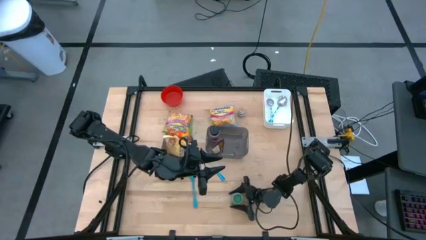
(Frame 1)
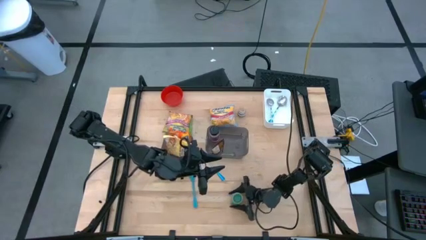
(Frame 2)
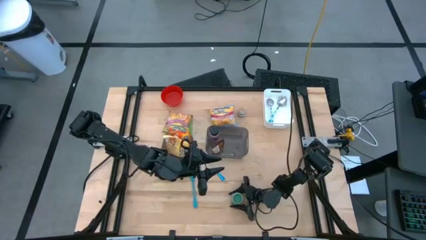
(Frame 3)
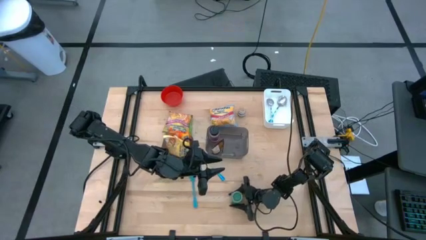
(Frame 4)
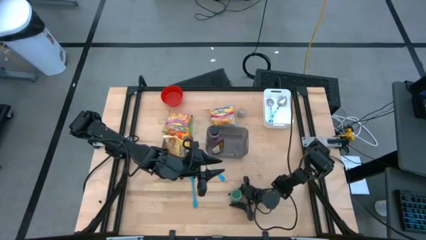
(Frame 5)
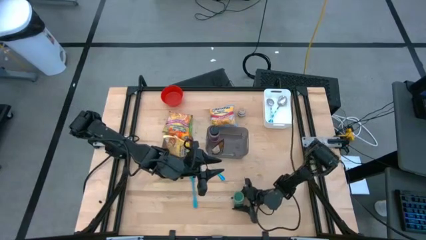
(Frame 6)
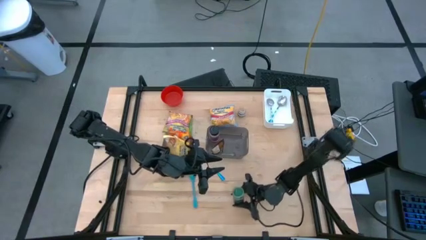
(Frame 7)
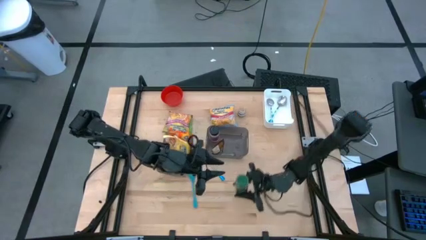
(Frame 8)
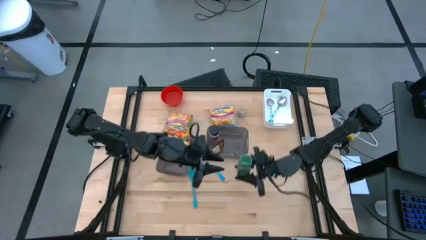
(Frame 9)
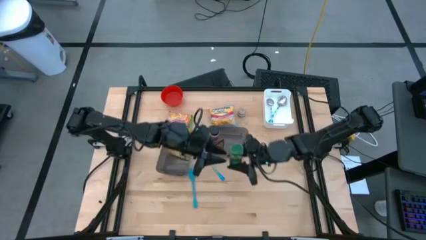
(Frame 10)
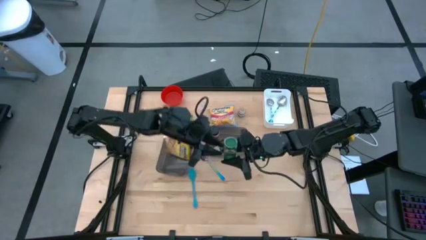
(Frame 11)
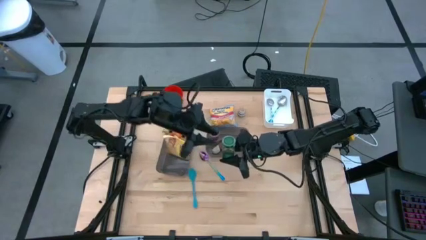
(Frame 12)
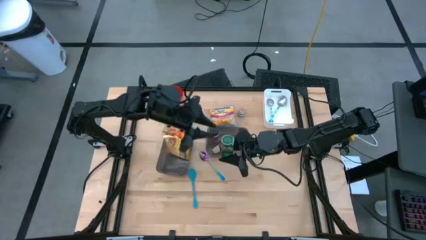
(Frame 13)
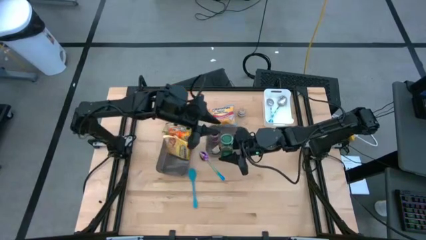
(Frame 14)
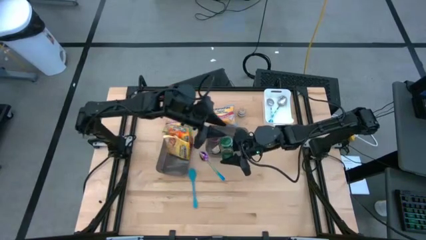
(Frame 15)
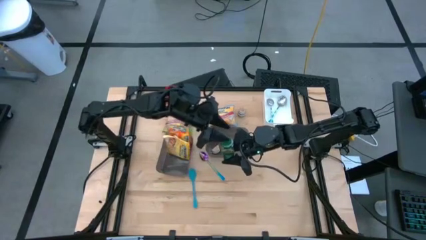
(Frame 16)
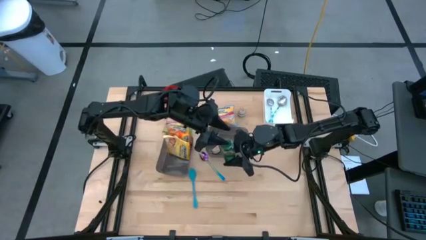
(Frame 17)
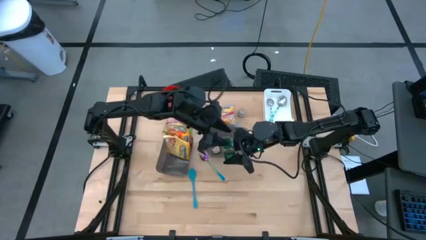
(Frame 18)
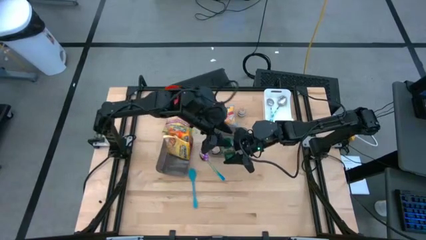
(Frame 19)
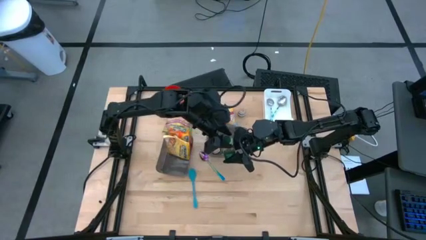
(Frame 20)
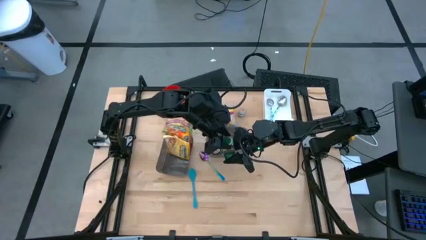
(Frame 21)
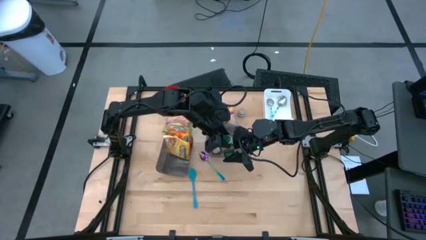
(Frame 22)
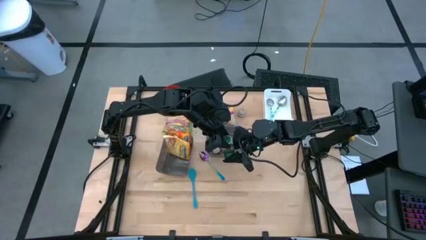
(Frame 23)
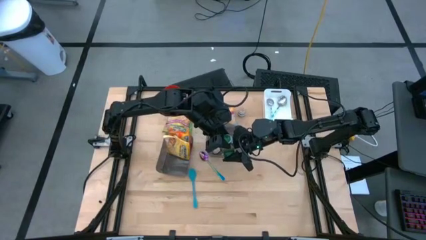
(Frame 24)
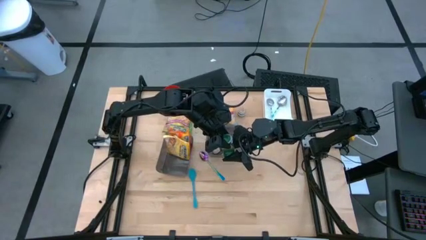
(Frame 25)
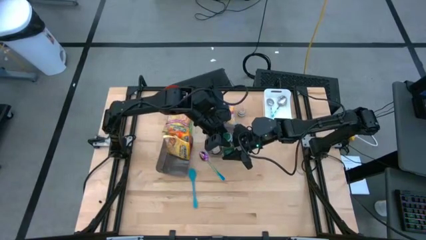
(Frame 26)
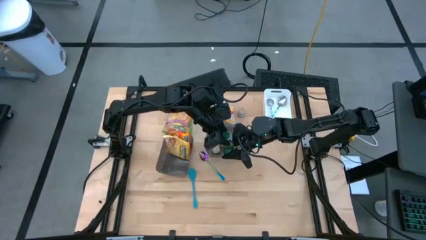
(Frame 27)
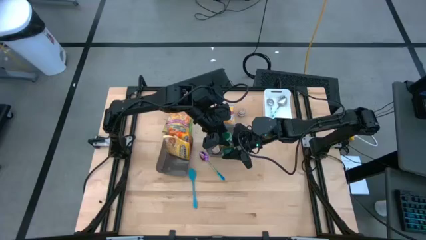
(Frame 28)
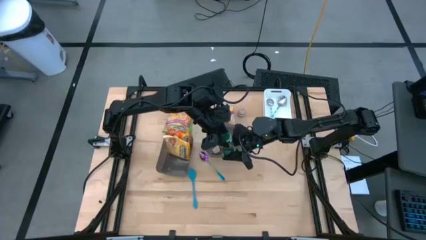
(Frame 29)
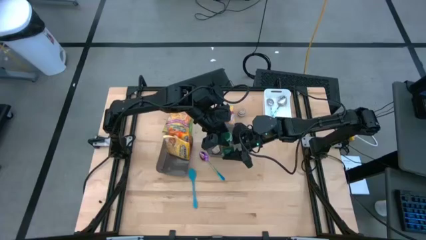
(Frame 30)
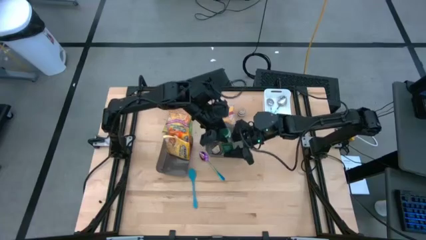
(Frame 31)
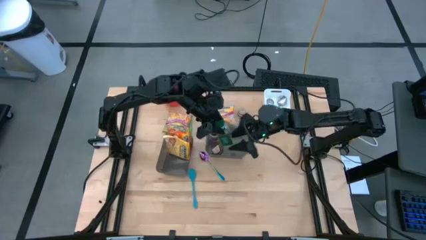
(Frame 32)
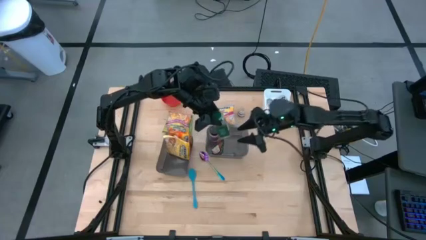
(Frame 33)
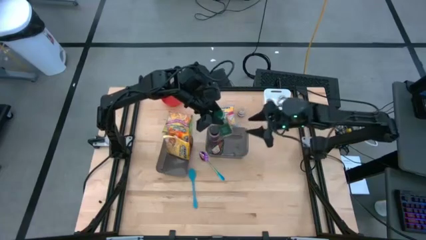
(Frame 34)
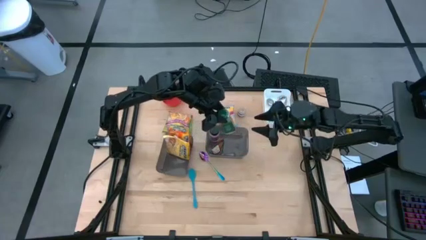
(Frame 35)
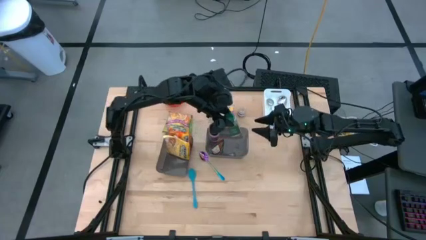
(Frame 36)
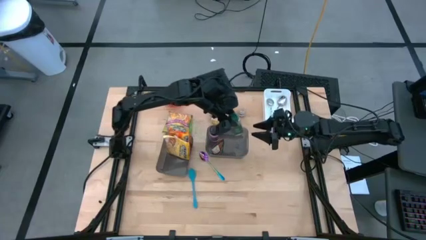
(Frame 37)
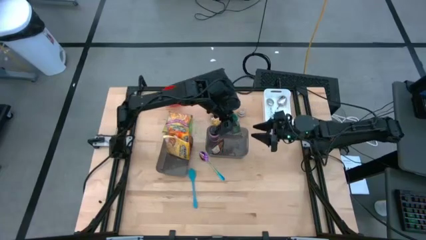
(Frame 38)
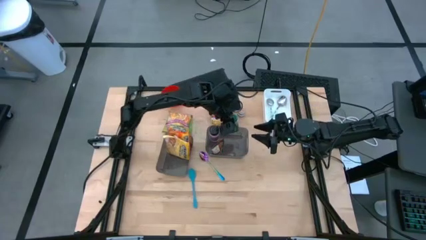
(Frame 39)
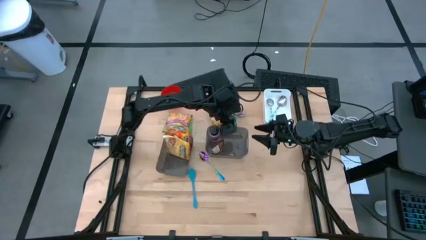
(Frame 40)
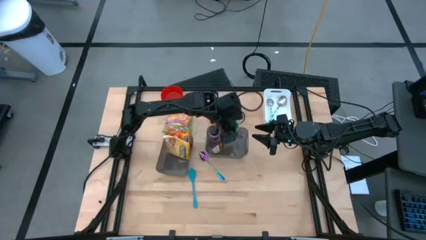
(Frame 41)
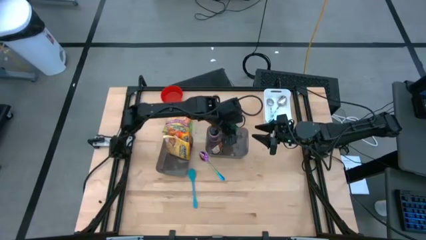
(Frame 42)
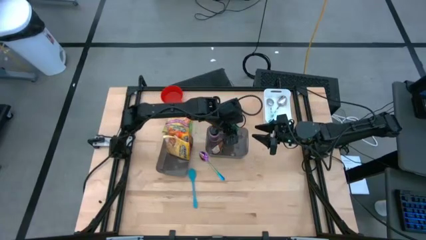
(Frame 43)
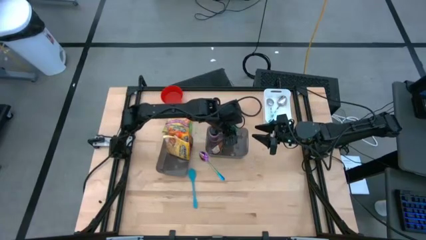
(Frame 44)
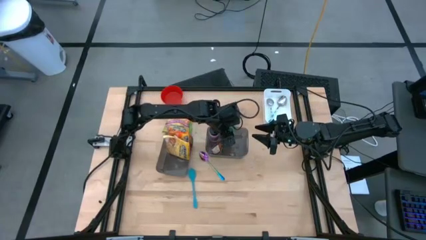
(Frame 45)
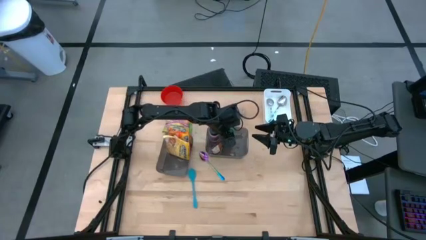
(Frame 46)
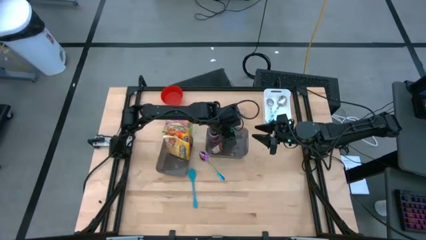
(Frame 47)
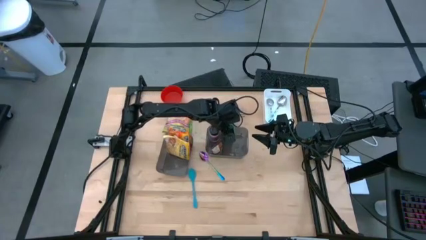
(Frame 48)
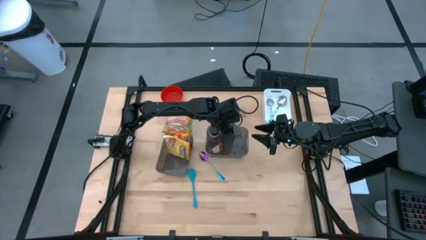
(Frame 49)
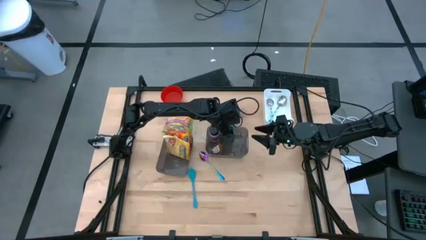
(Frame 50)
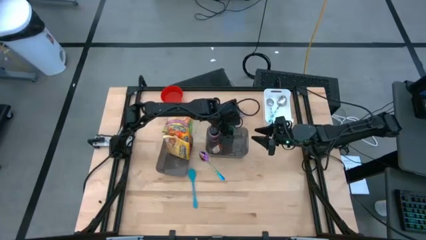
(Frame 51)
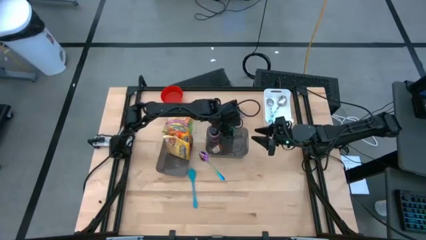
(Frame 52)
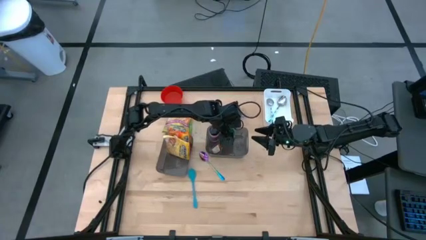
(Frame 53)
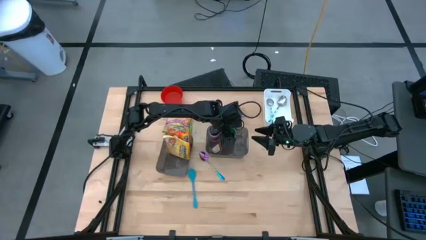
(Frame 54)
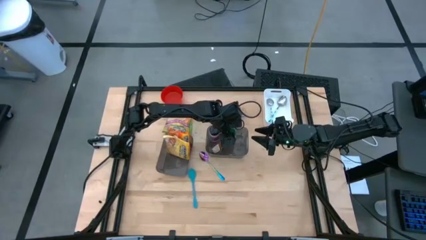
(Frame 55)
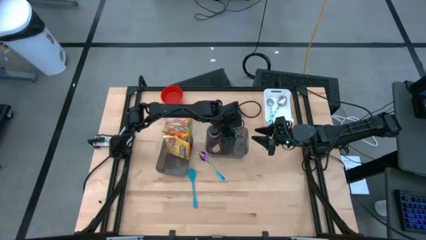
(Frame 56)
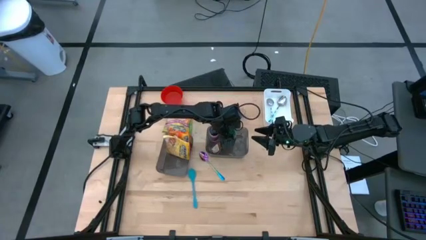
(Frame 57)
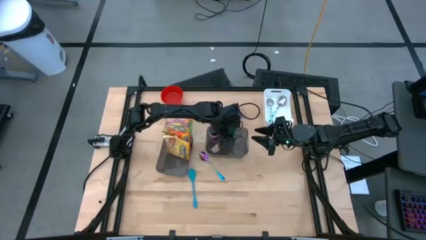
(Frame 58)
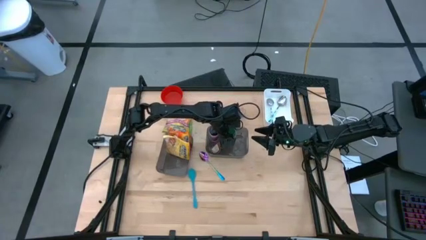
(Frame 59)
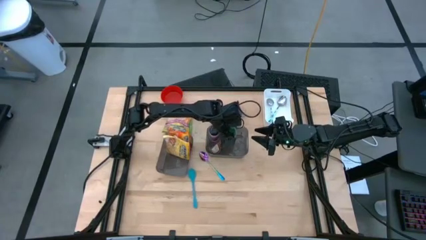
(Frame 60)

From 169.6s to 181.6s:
Task: Pick & Place Food Item
Put the green spice bottle into the right black bin
